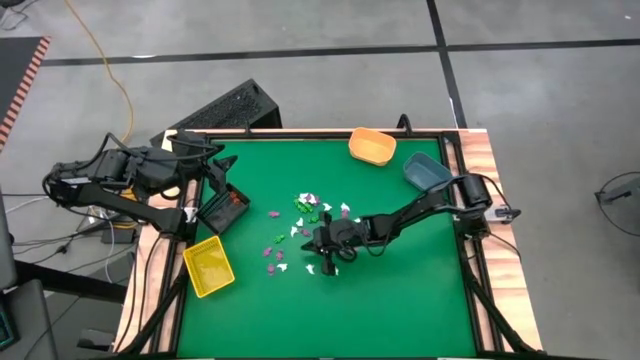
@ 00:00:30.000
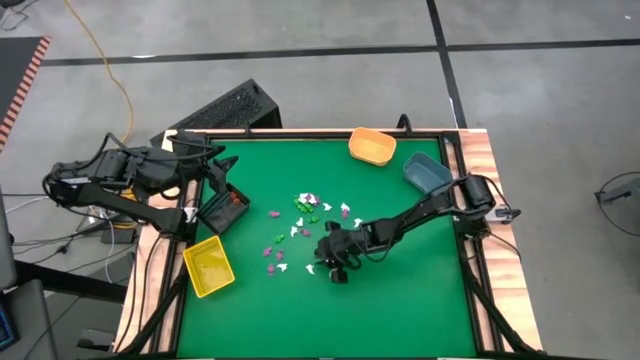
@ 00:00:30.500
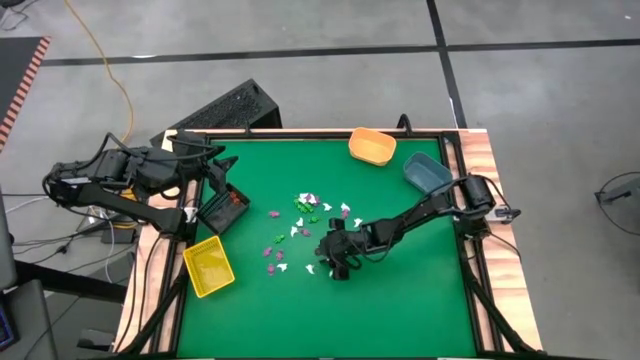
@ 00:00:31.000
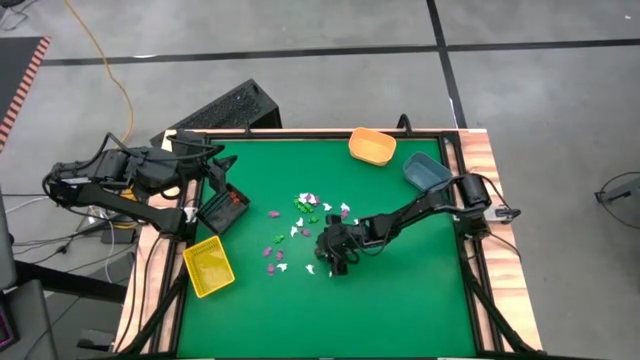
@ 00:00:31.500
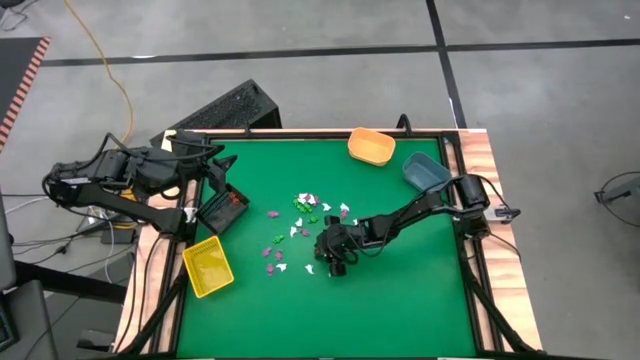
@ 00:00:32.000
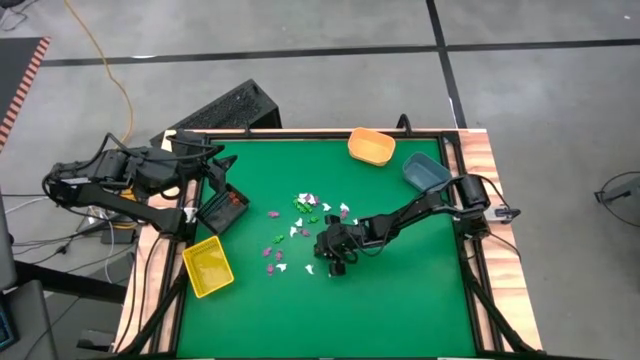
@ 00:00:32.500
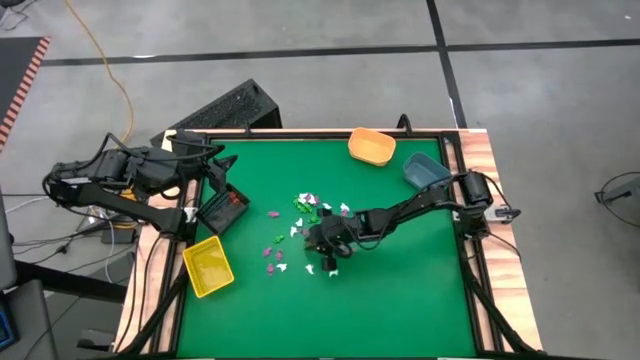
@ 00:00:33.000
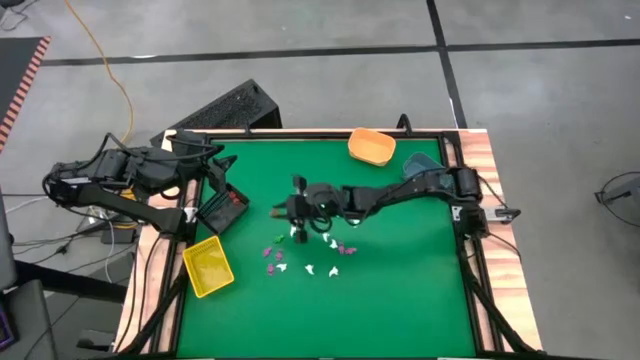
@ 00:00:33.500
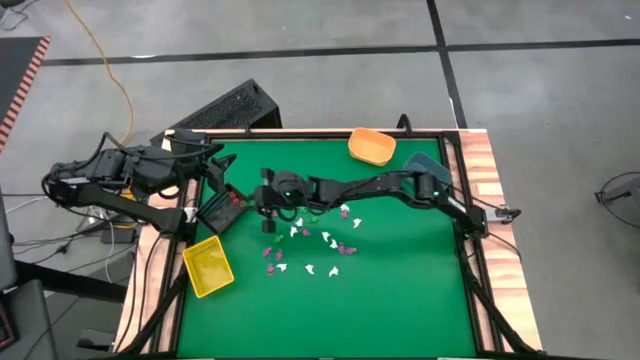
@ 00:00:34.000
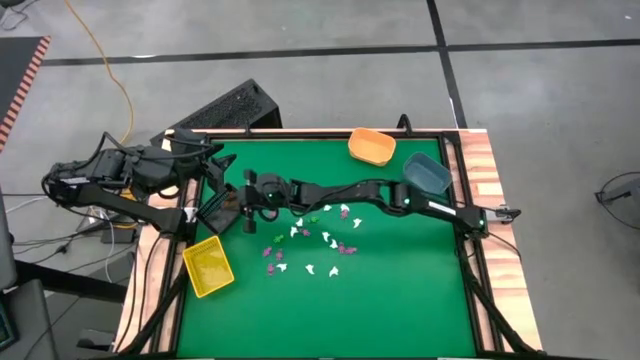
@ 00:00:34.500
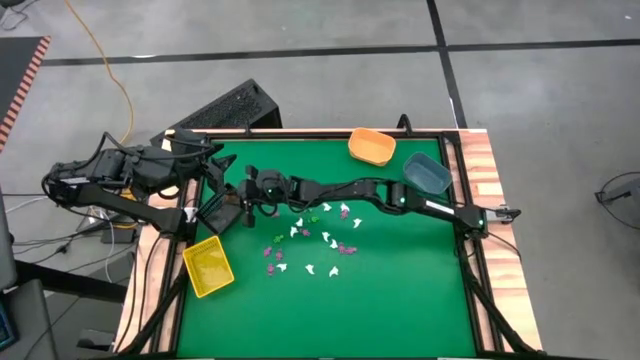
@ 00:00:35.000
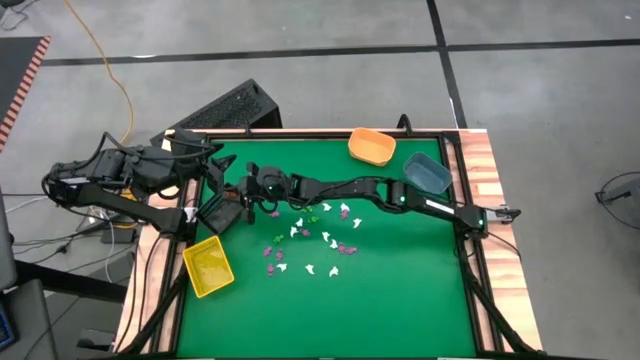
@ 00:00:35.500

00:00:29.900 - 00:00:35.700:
Task: Sort Halloween decoration
Put the orange pumpkin toy into the black bin

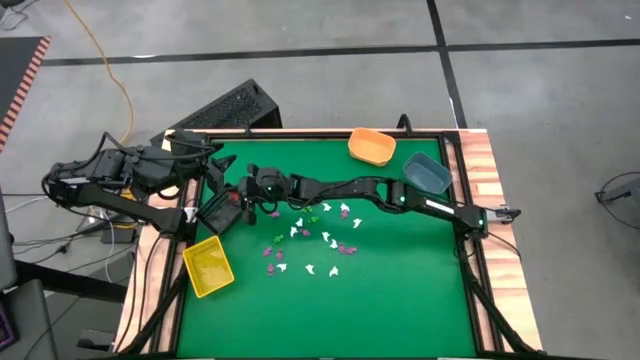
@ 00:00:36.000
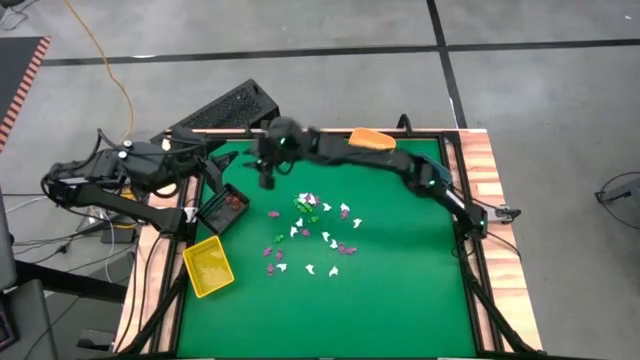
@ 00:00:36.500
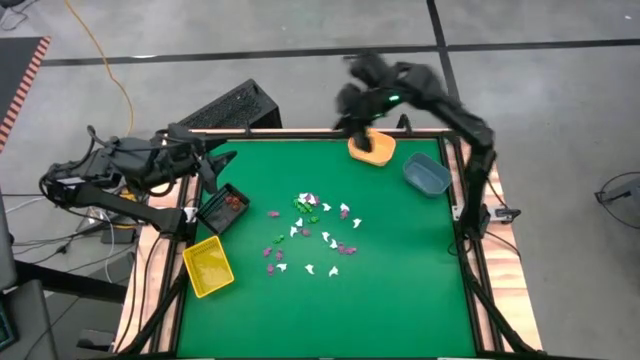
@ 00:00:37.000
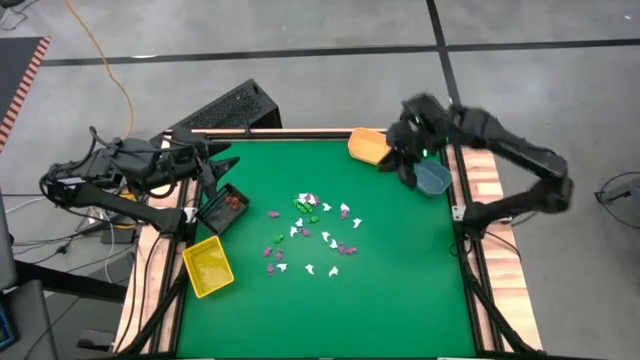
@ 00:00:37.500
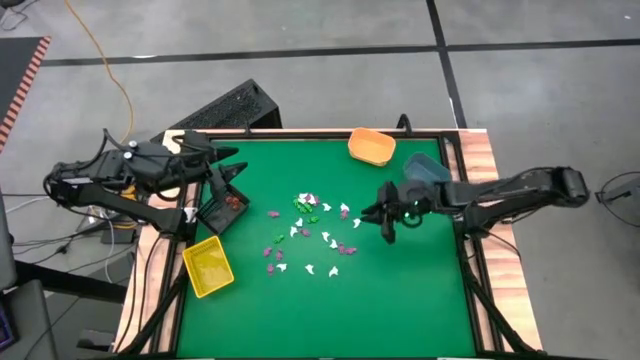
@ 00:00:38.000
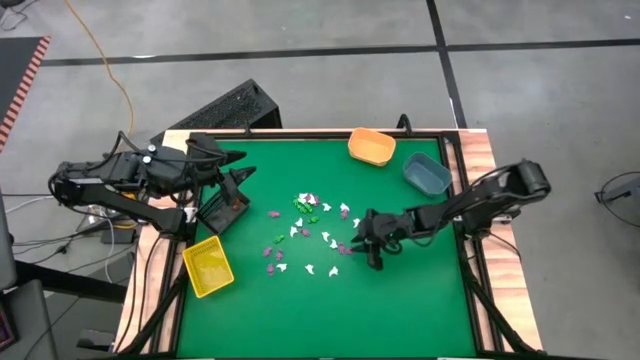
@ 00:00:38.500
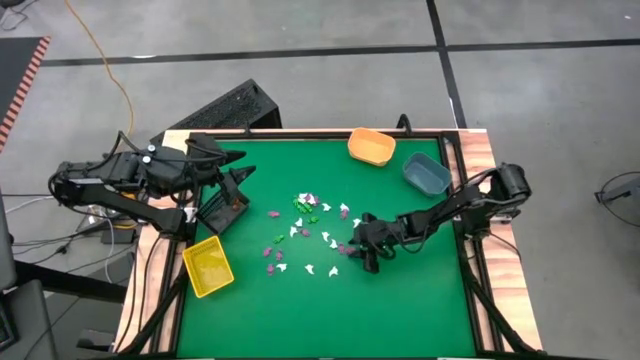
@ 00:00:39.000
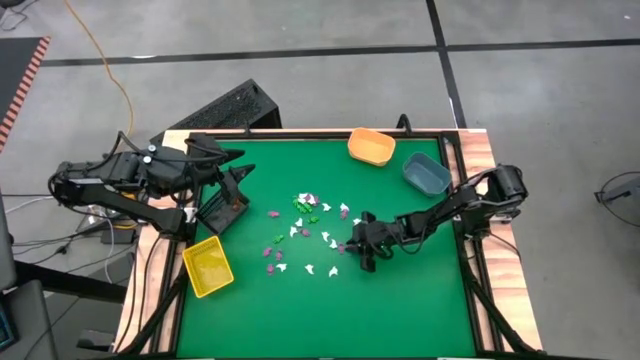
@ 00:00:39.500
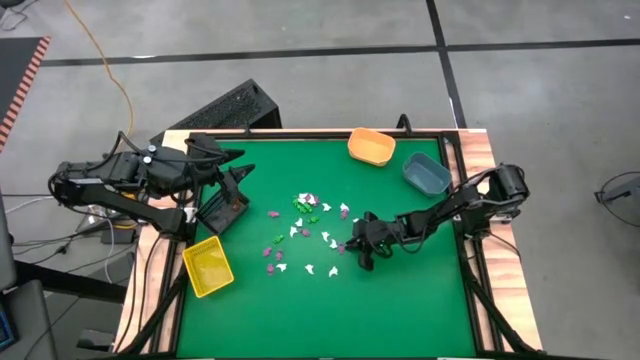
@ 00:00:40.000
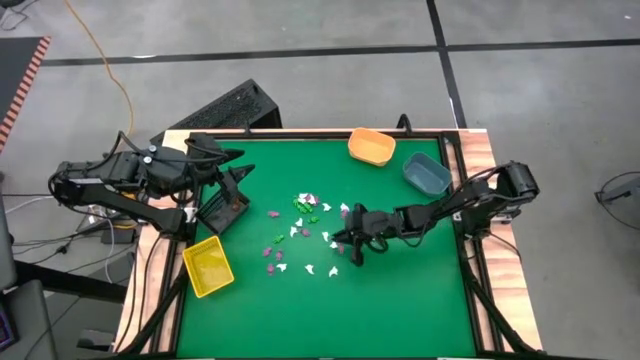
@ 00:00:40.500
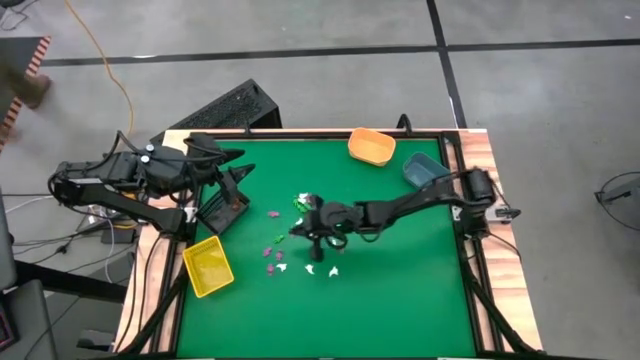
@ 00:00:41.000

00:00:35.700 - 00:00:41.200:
Put the pink skeleton toy into the yellow bin

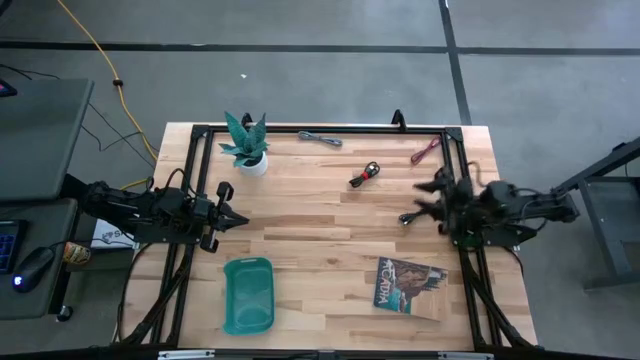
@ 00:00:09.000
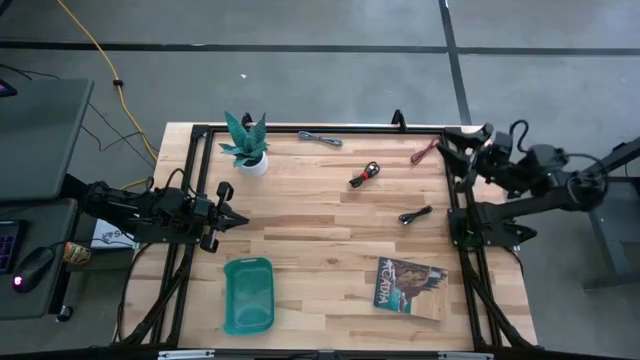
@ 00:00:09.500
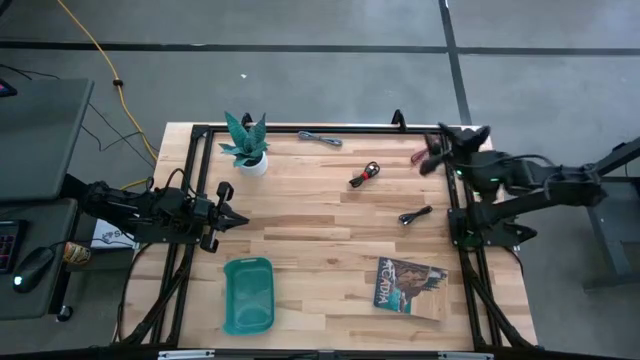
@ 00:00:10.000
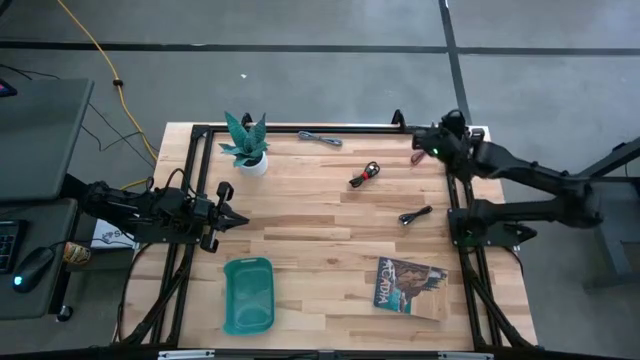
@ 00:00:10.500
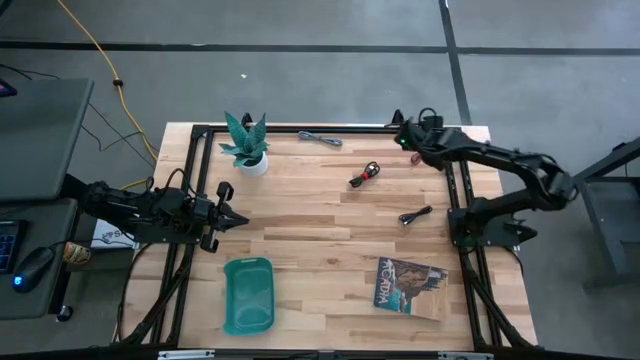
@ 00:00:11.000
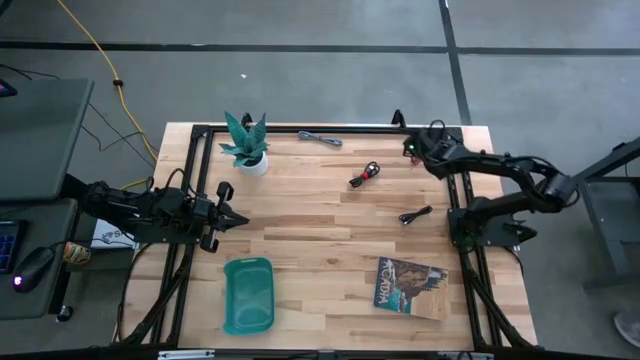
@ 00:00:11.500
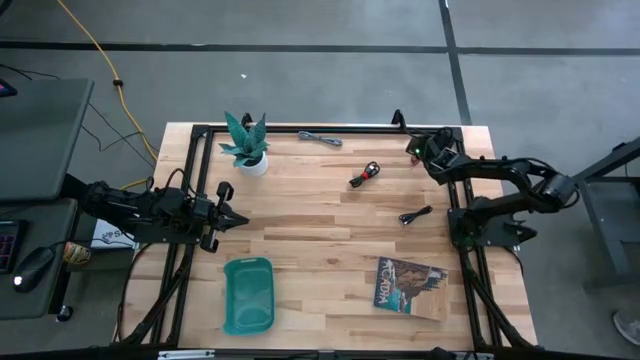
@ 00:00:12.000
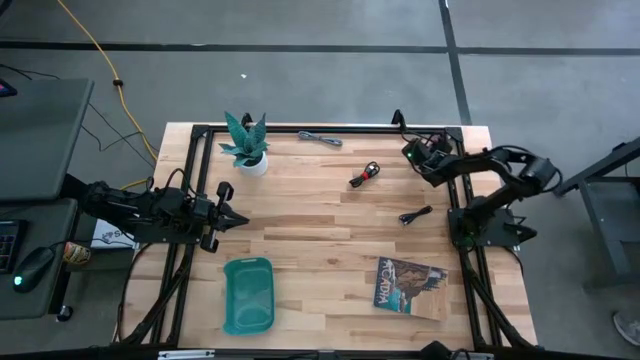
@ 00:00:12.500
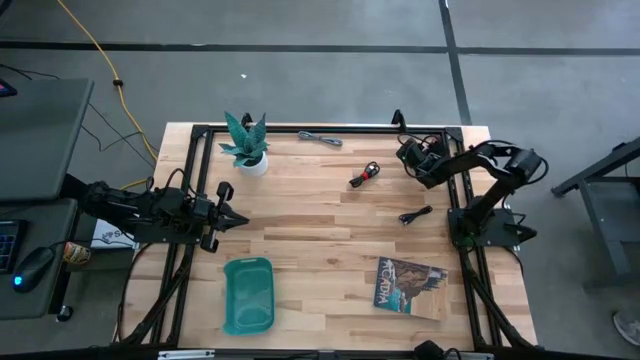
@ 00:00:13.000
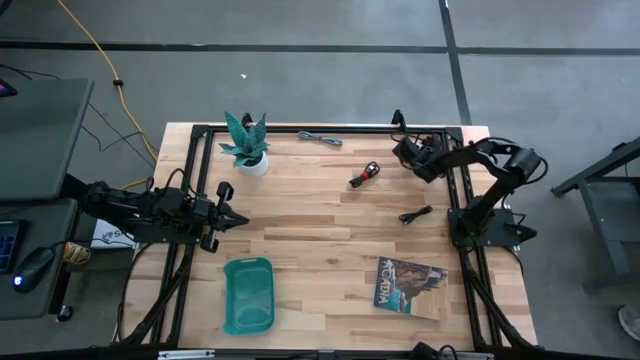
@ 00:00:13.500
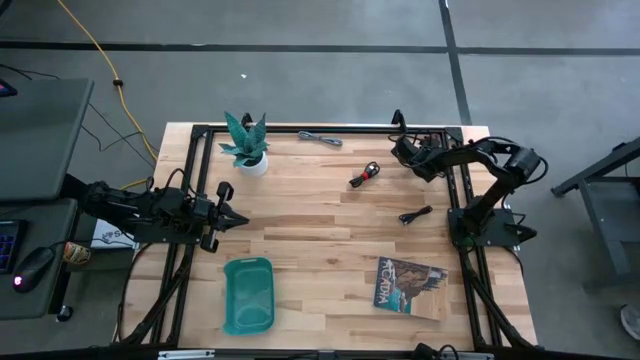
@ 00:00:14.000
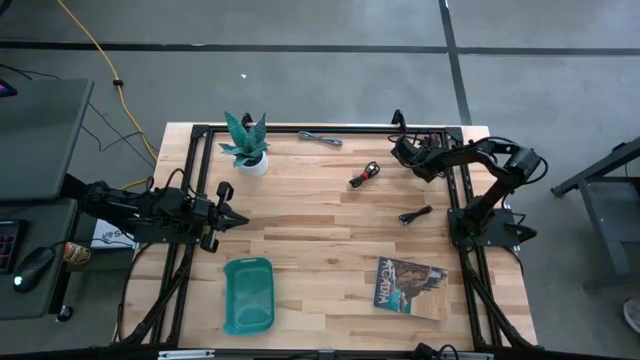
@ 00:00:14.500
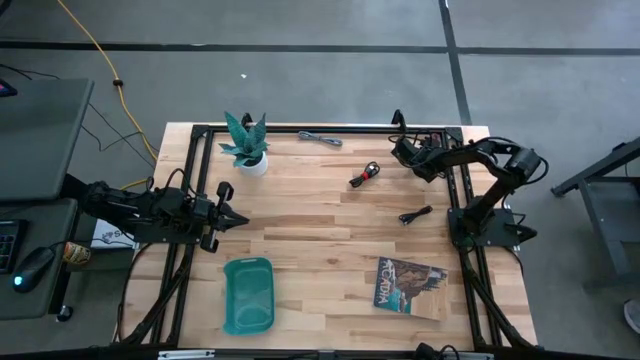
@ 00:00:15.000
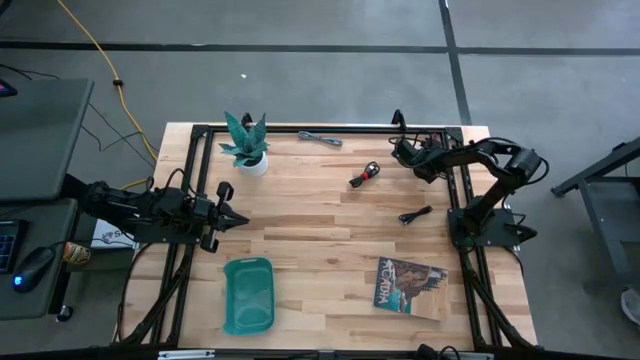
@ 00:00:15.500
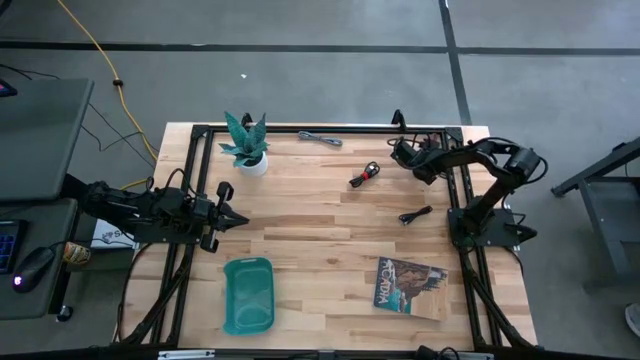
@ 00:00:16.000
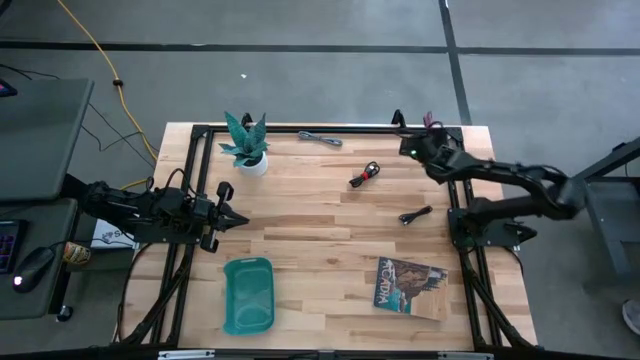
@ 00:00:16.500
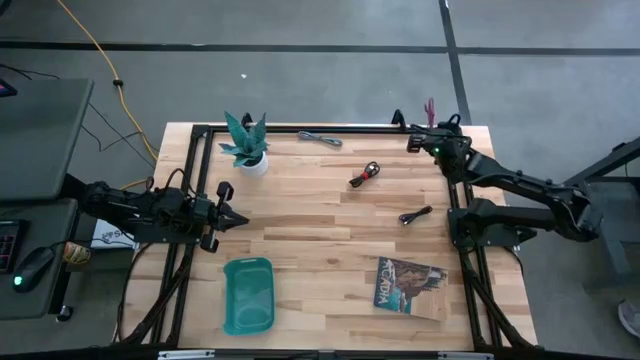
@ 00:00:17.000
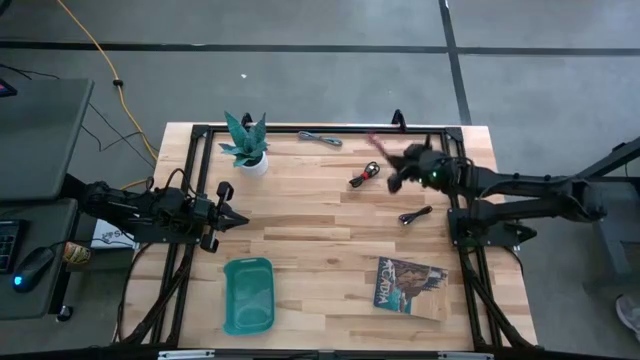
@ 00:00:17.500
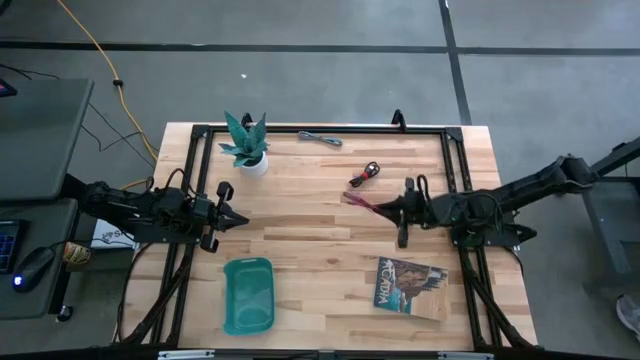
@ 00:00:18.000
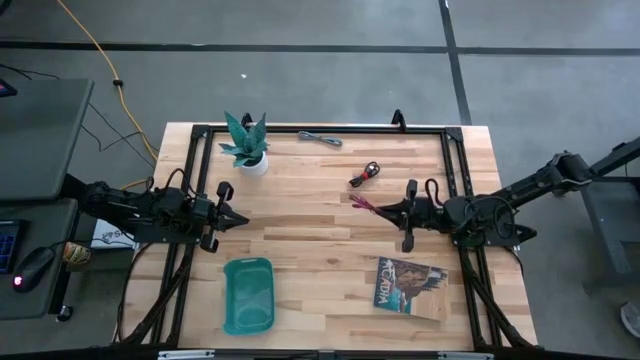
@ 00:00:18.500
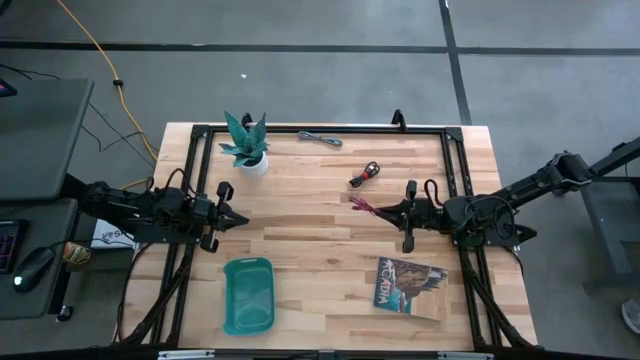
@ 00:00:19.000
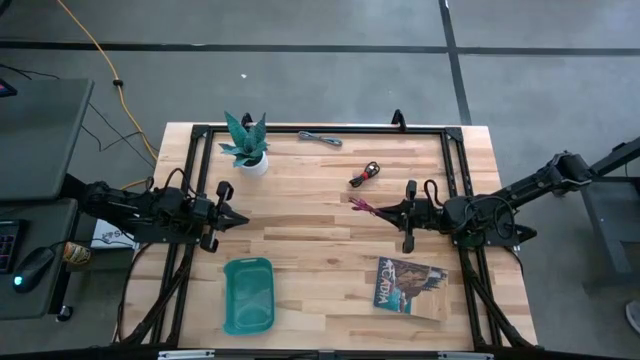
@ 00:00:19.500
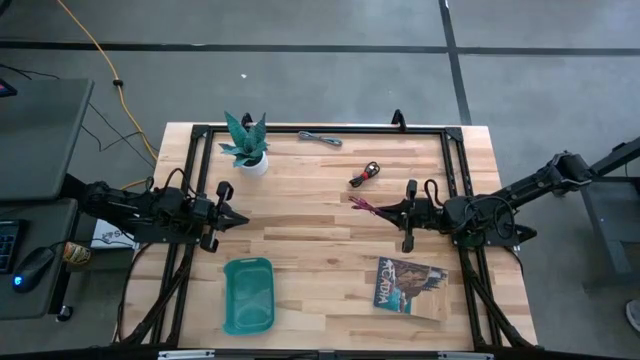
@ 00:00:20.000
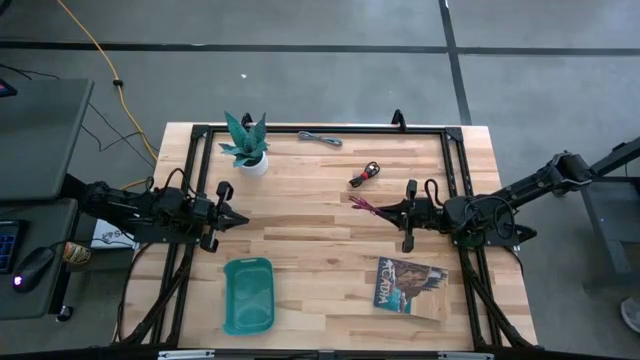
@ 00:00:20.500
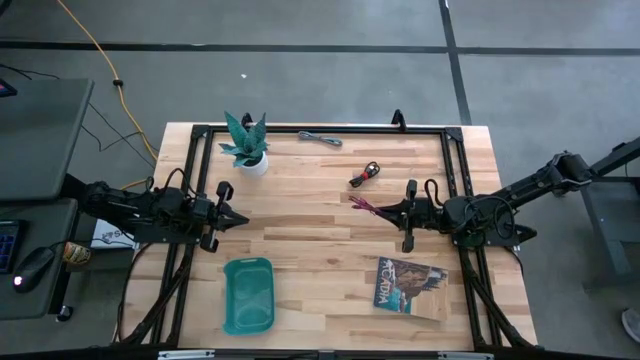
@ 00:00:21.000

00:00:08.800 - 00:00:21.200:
Task: Pick and place USB-C Cables
Put the pink USB cable into the green bin
